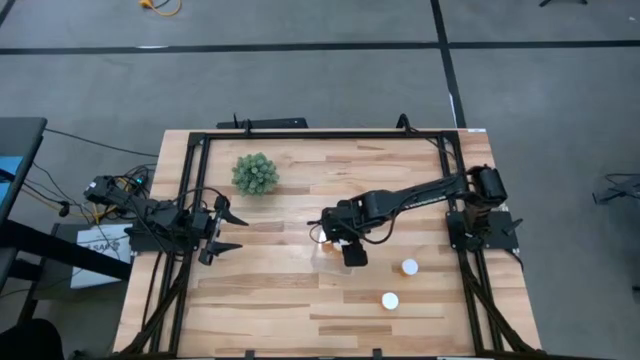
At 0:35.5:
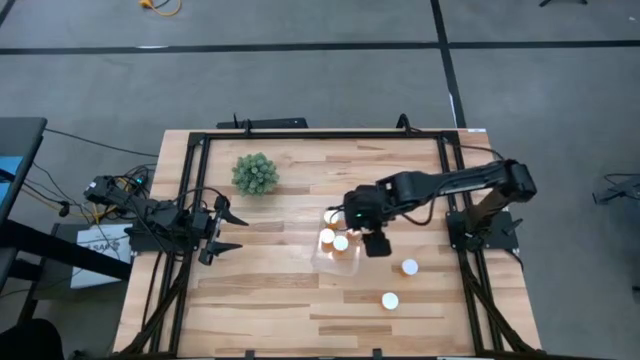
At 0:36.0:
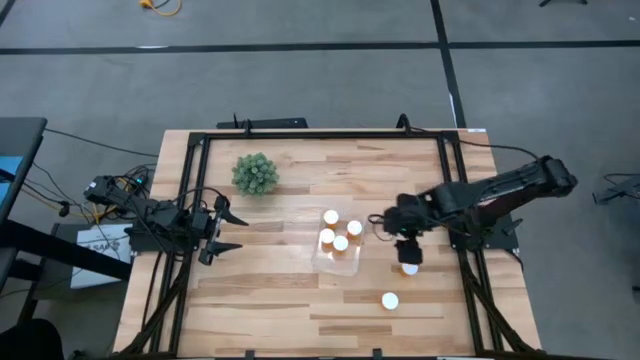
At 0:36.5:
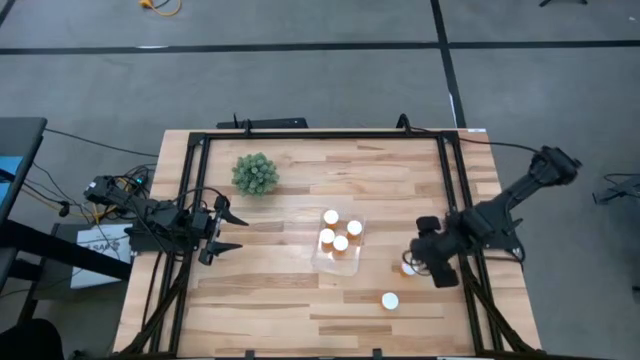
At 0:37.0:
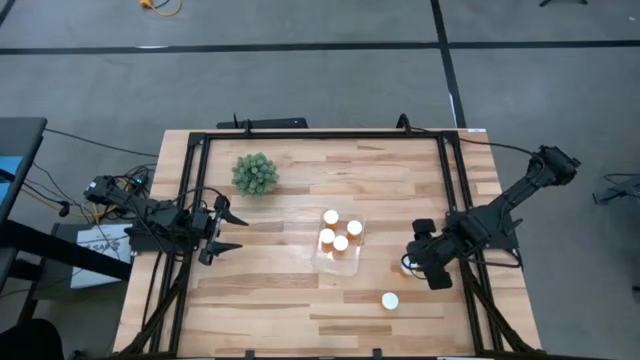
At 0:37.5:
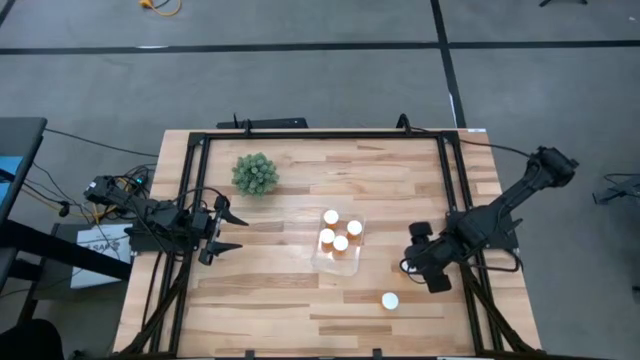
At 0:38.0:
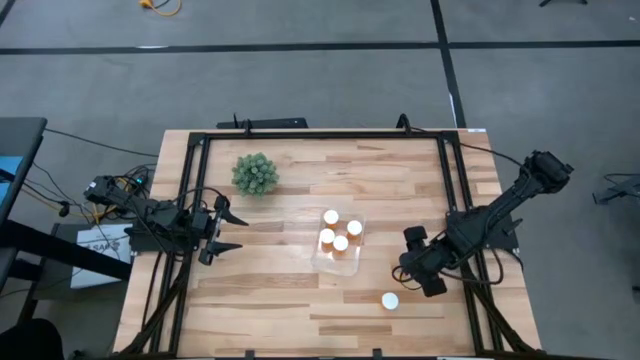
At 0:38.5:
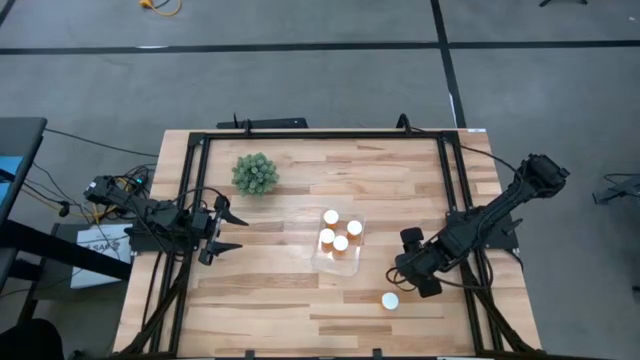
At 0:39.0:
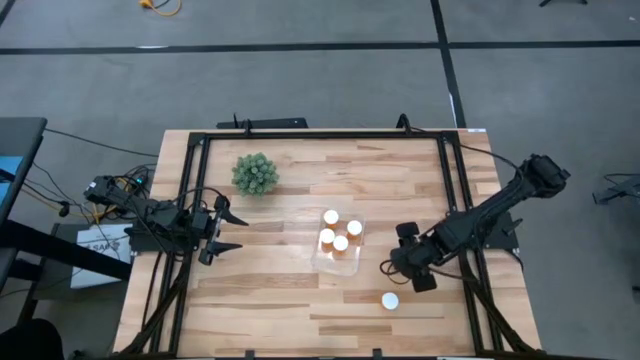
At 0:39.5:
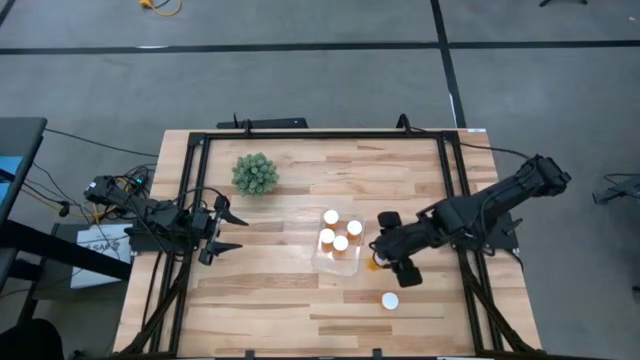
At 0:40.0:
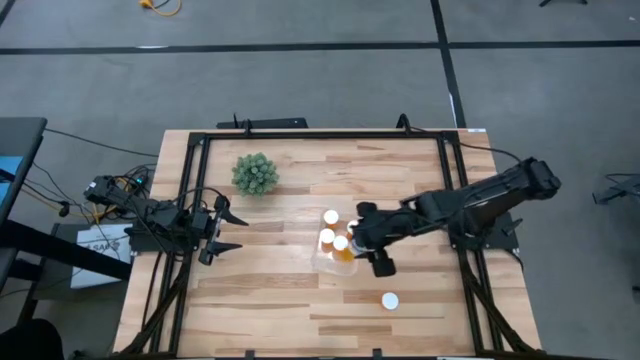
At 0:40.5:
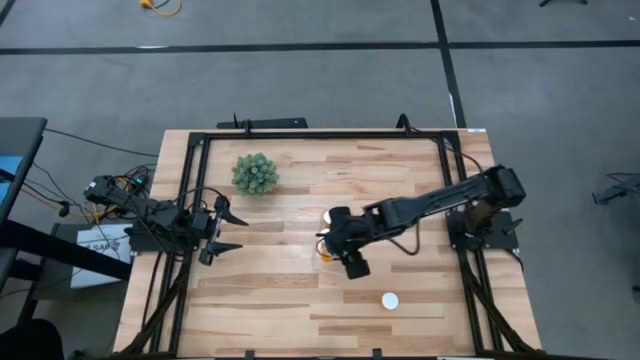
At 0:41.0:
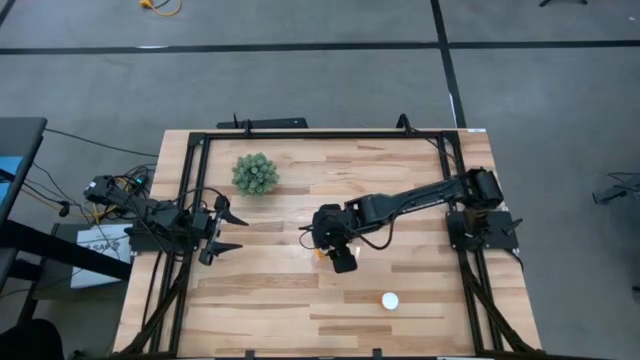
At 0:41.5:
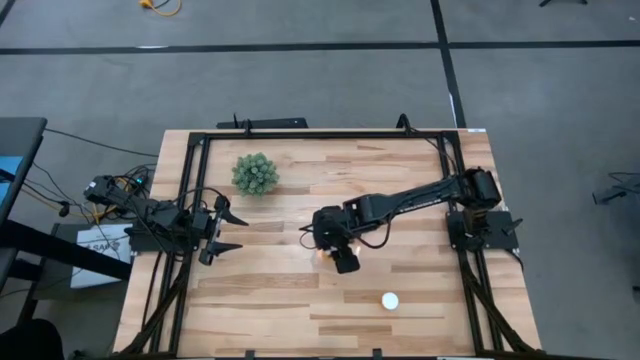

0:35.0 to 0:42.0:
Task: Pick and place pill bottles into a basket
Put the orange medicine bottle into the transparent bin

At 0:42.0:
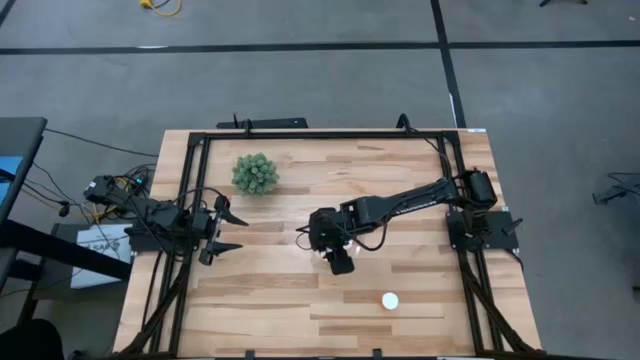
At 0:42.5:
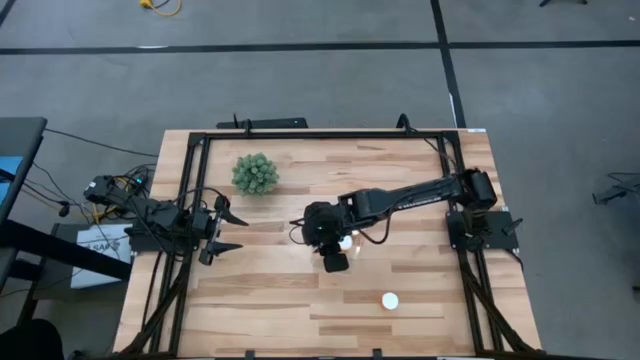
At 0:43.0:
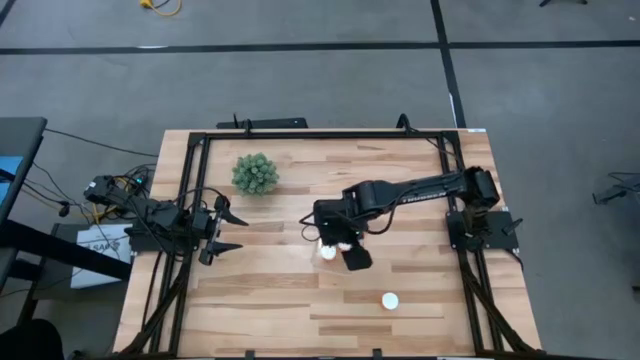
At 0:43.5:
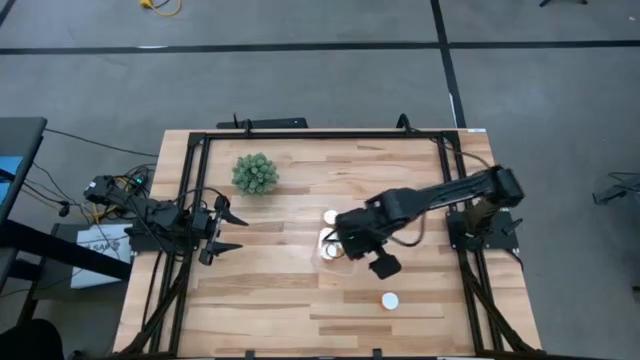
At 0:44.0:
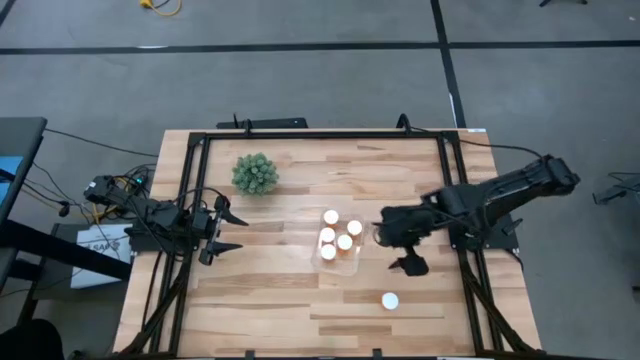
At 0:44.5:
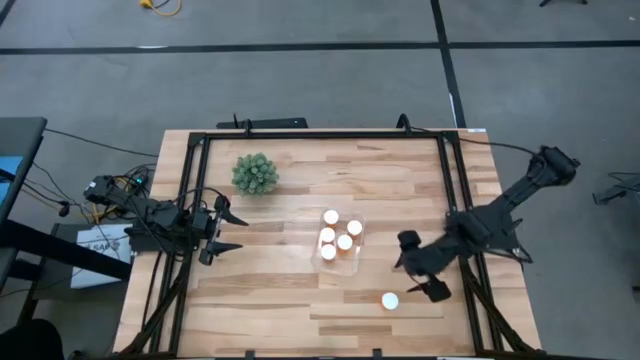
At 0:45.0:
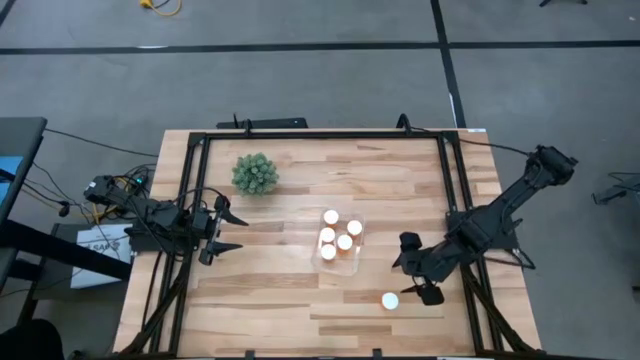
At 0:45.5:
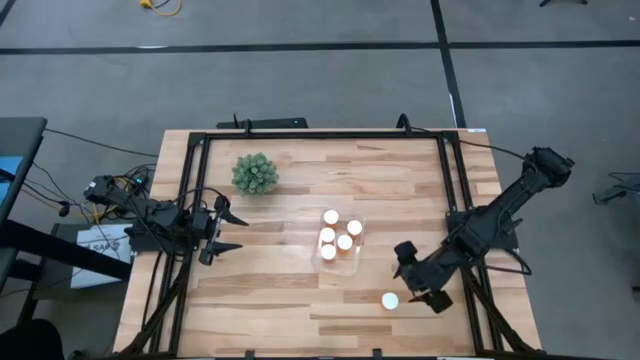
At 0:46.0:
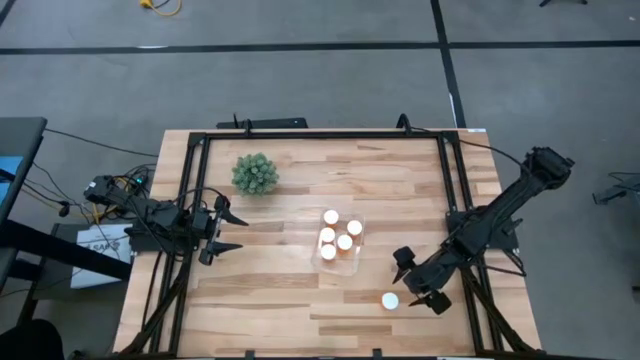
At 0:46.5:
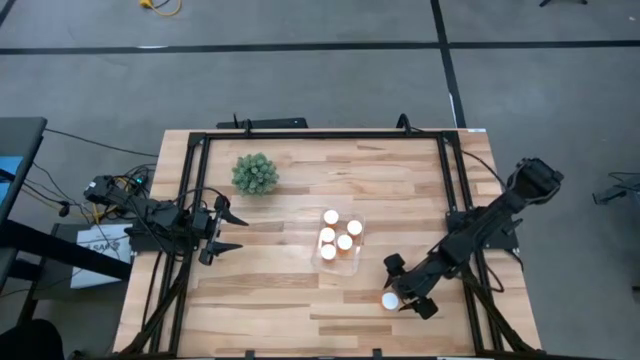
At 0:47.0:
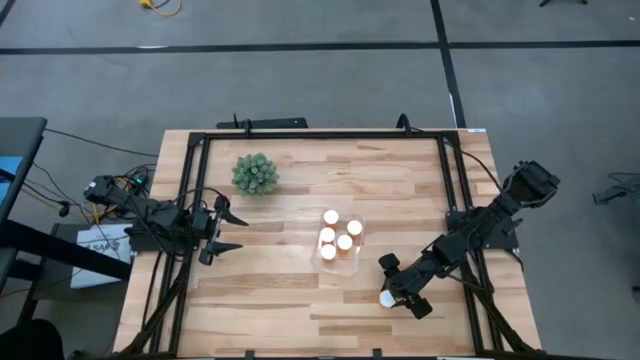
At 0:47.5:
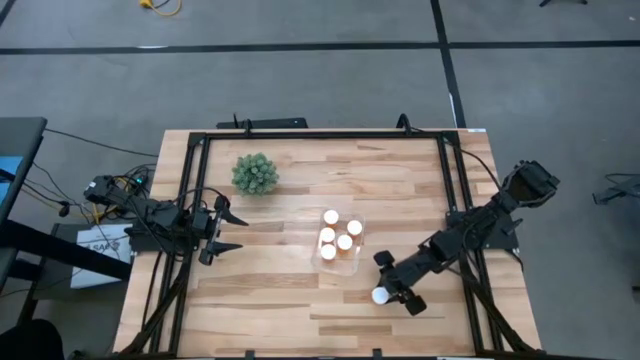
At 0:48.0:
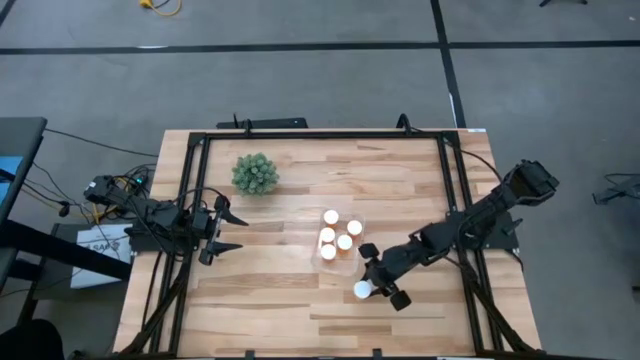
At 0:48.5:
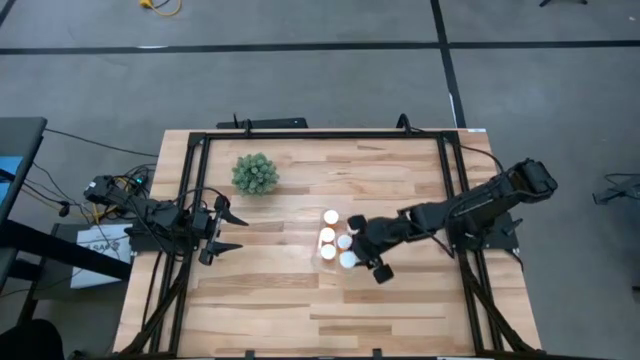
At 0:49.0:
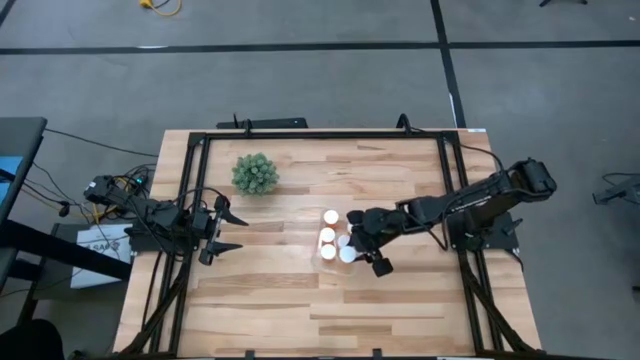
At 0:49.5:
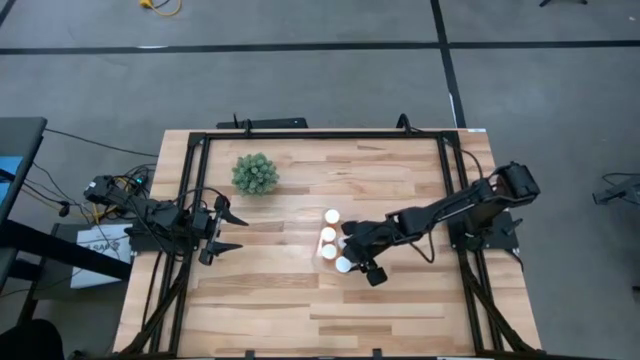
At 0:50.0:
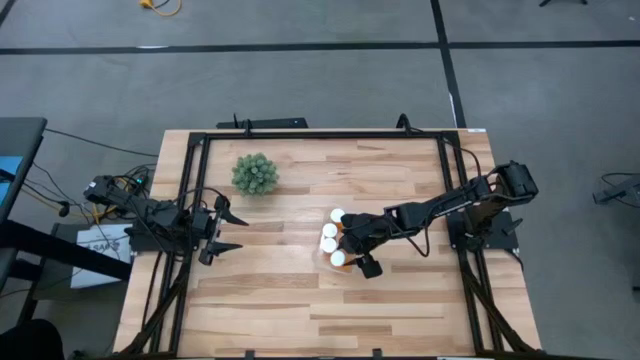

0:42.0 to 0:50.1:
Put the orange medicine bottle into the transparent bin

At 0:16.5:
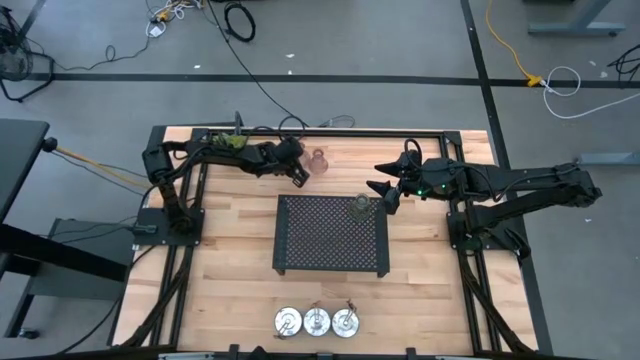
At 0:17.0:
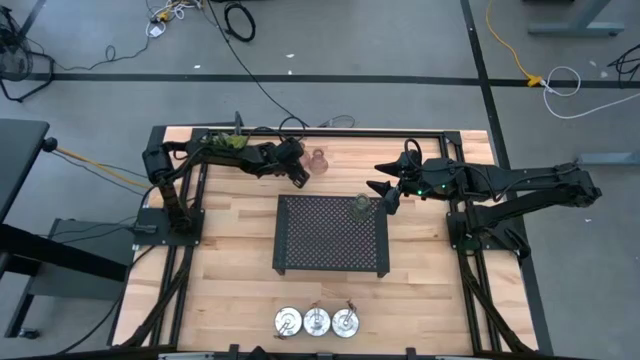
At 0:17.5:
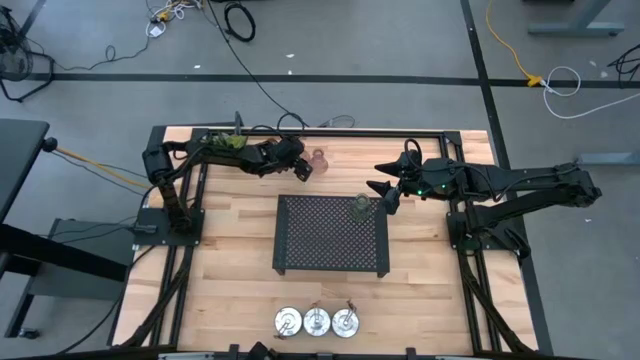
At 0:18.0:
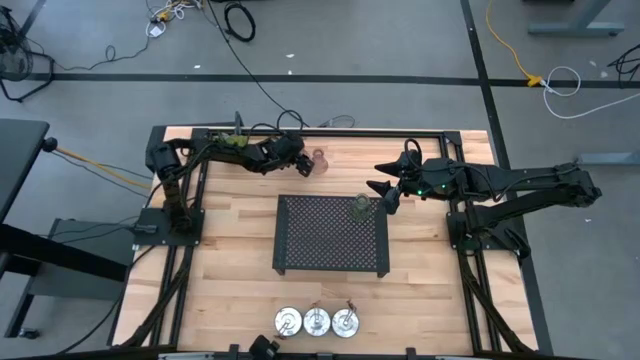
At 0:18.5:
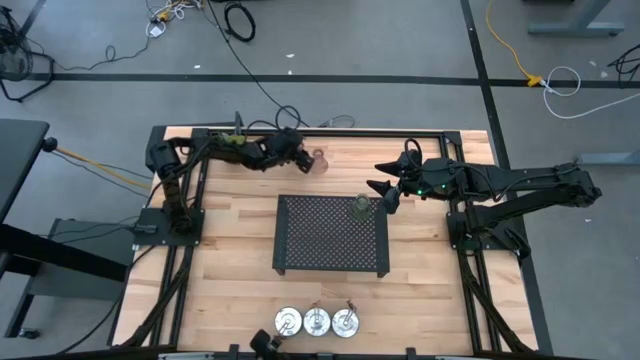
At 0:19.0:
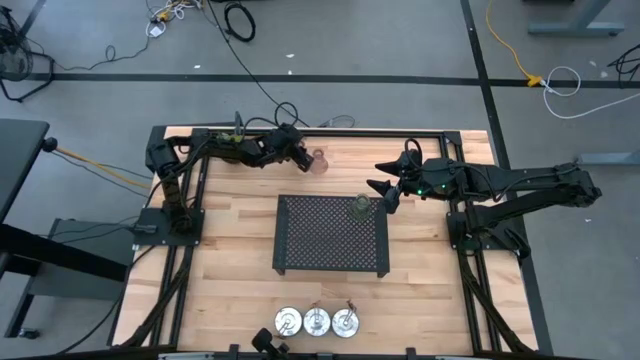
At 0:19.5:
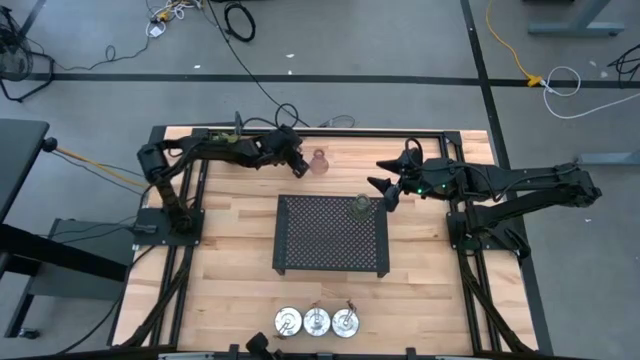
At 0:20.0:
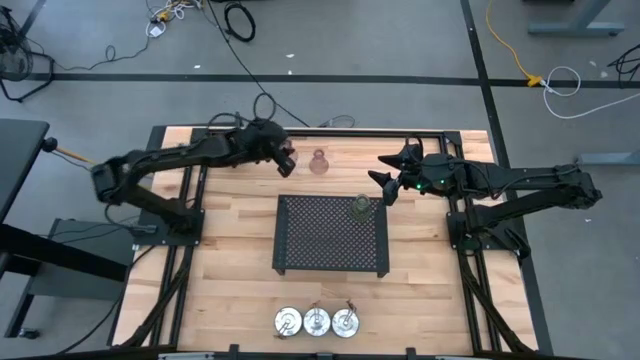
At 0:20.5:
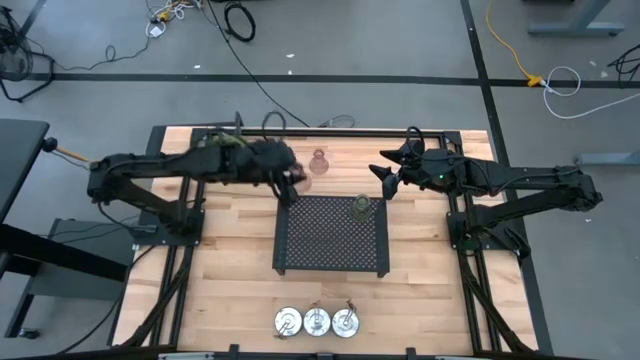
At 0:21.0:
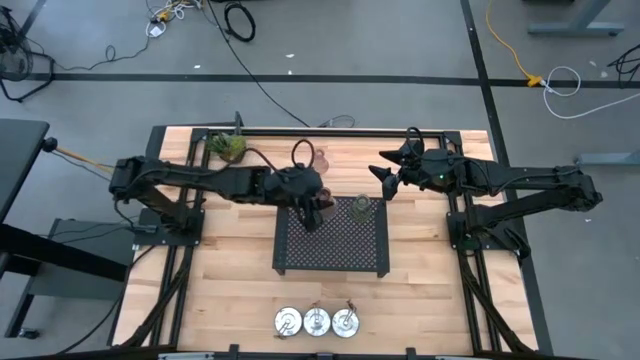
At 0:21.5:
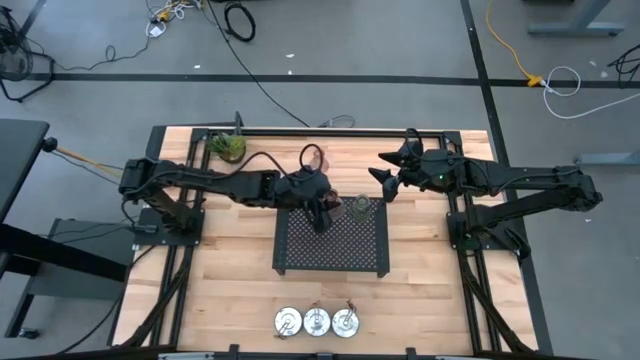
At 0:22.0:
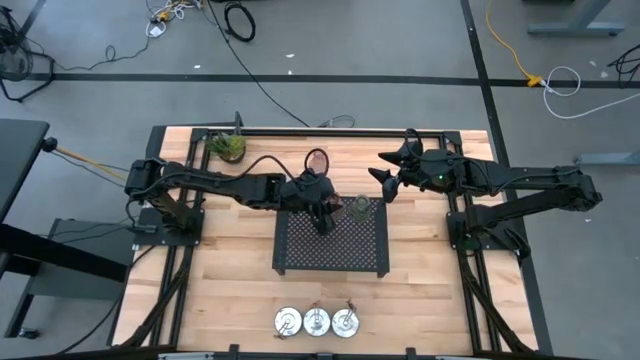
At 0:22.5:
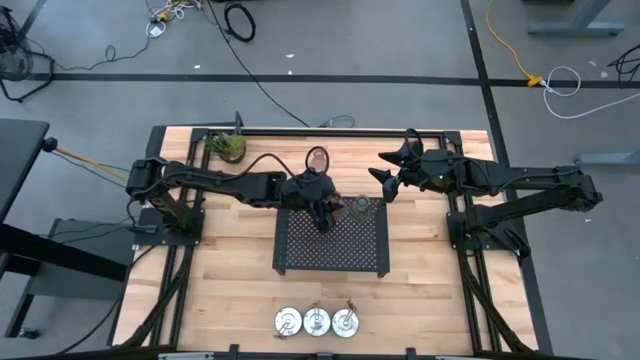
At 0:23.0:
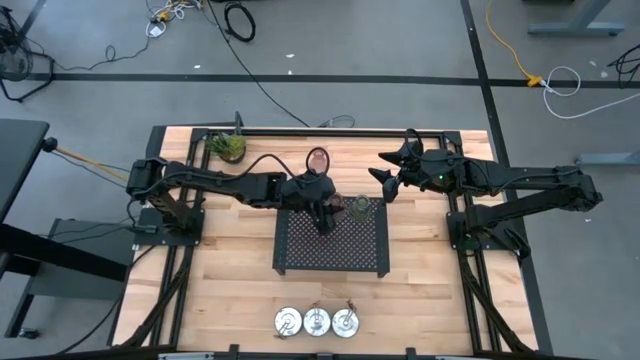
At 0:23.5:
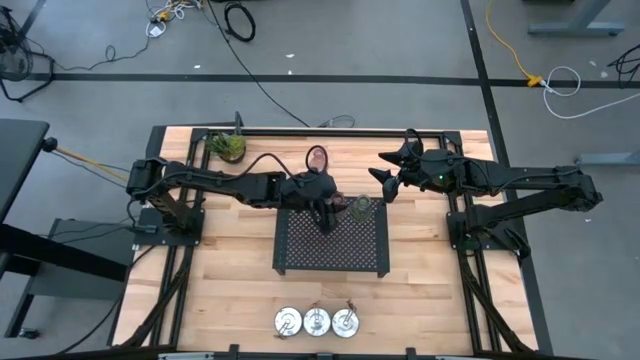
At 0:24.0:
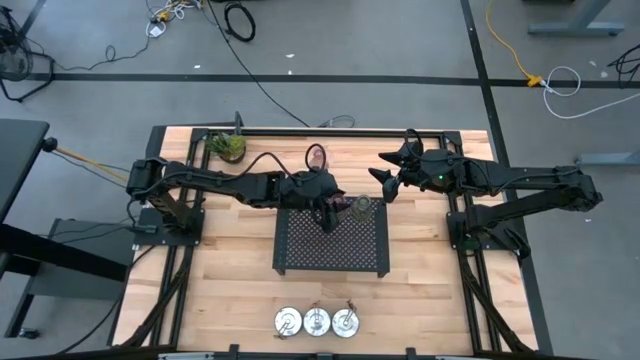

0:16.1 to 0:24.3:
Task: Pick & Place candle stick holders
Put the left pink glass candle holder on the shelf
